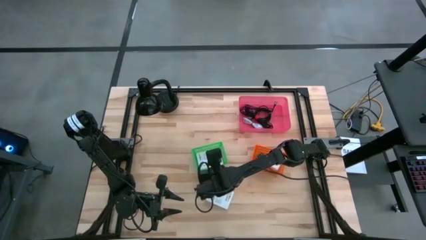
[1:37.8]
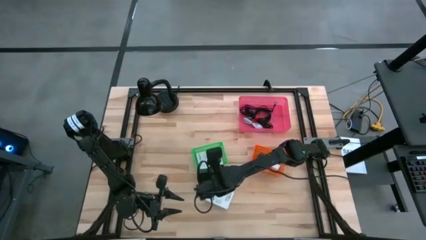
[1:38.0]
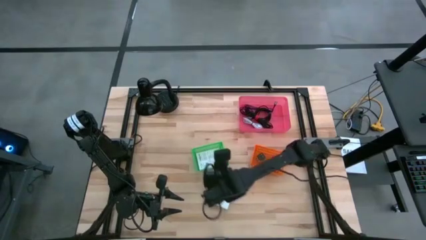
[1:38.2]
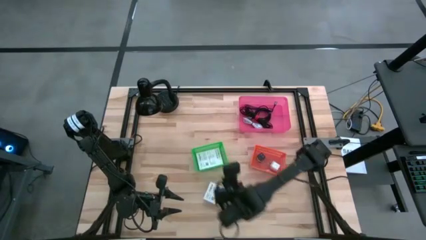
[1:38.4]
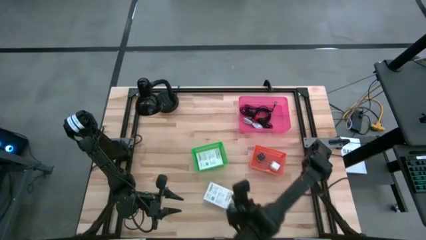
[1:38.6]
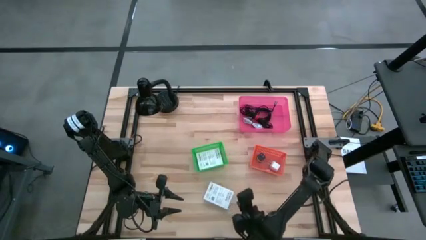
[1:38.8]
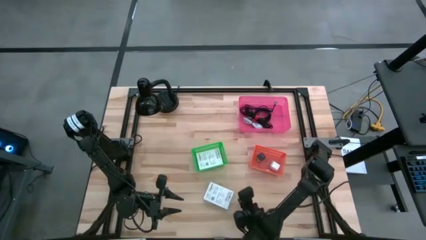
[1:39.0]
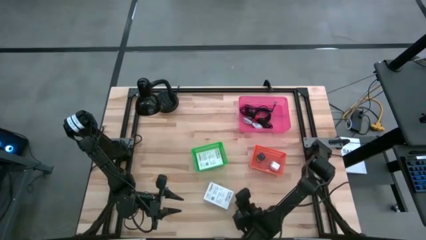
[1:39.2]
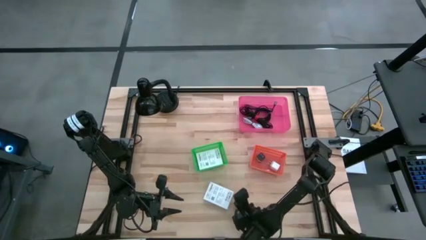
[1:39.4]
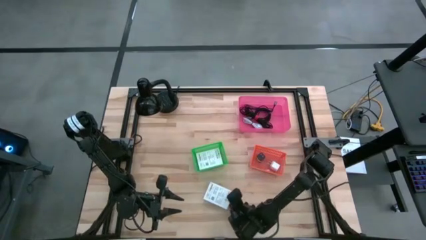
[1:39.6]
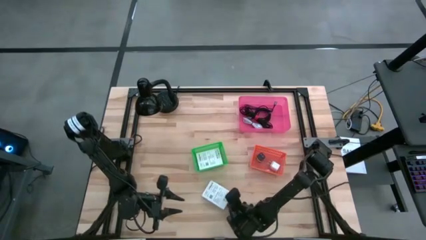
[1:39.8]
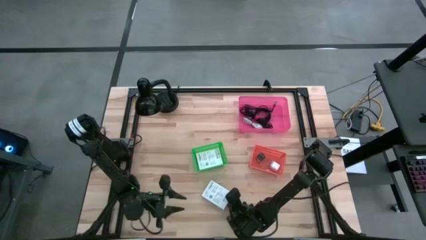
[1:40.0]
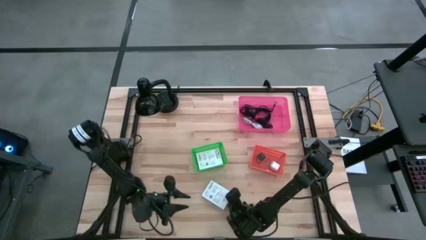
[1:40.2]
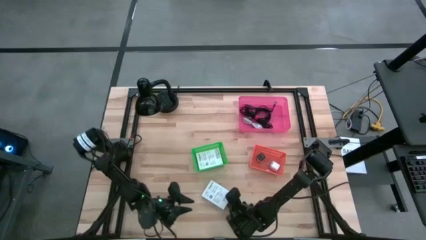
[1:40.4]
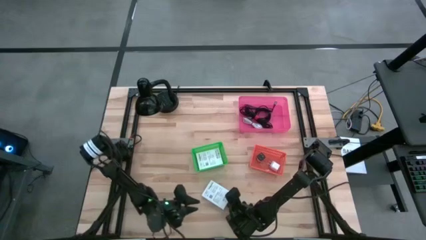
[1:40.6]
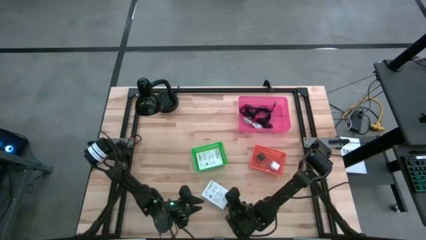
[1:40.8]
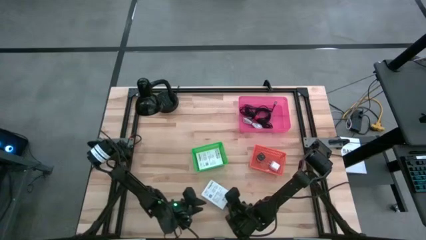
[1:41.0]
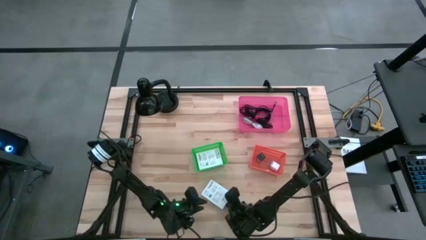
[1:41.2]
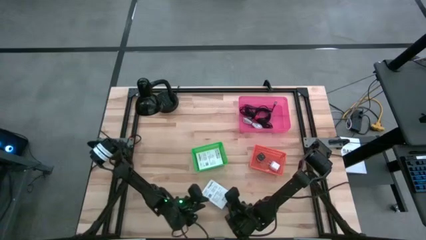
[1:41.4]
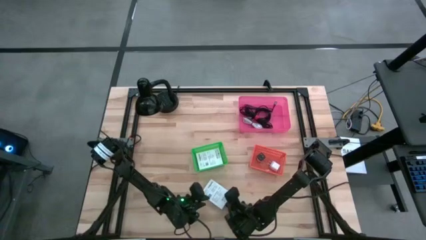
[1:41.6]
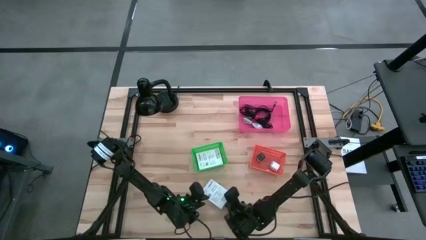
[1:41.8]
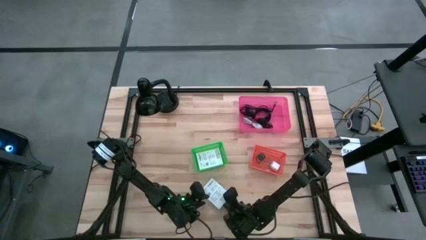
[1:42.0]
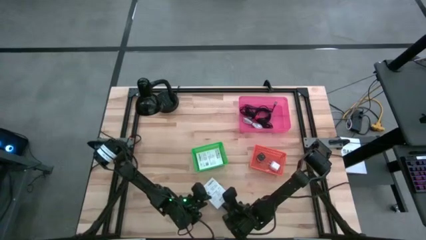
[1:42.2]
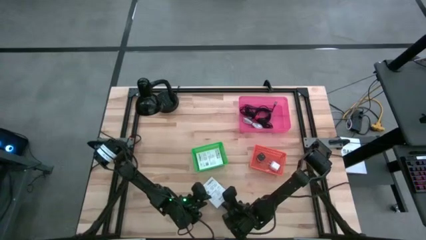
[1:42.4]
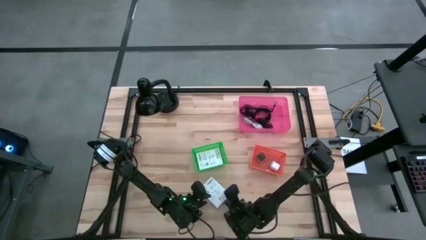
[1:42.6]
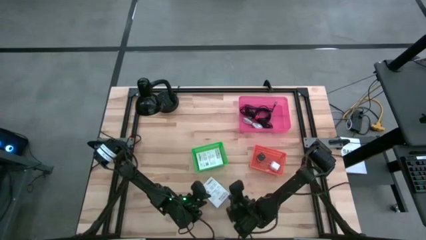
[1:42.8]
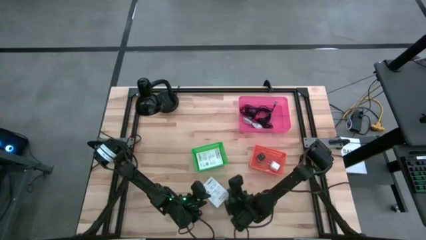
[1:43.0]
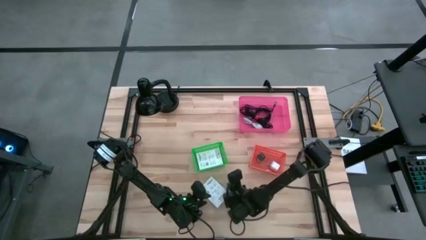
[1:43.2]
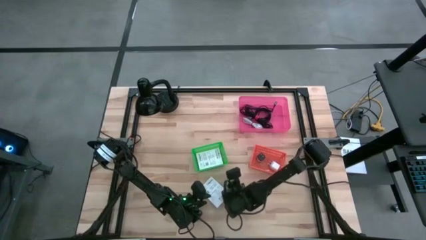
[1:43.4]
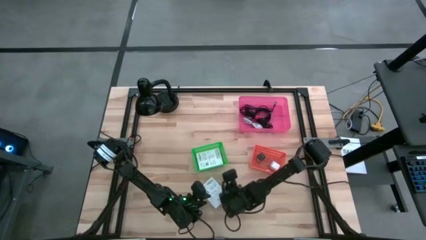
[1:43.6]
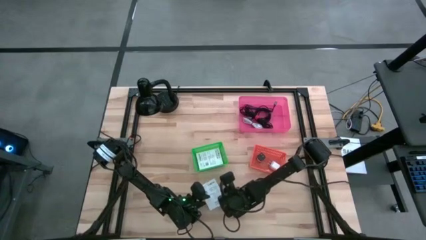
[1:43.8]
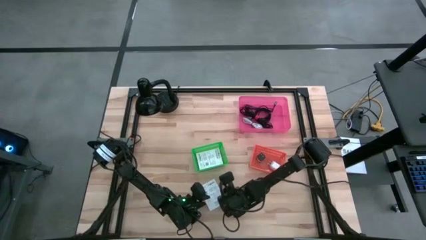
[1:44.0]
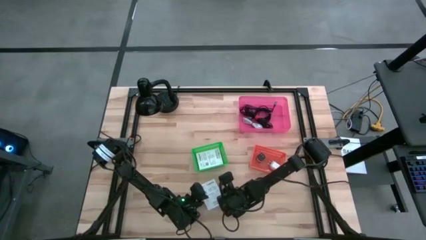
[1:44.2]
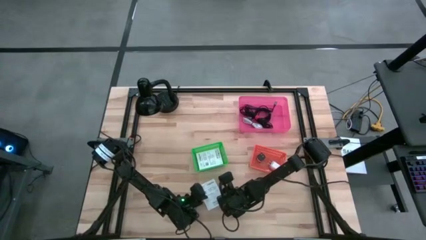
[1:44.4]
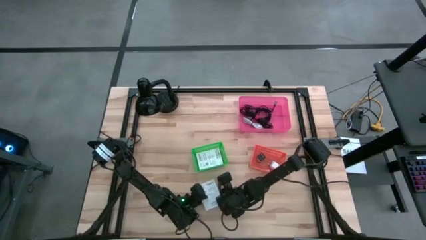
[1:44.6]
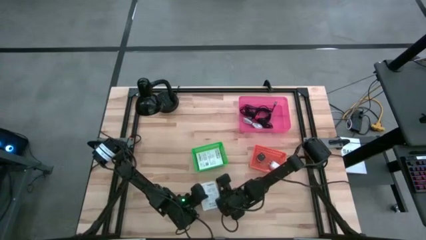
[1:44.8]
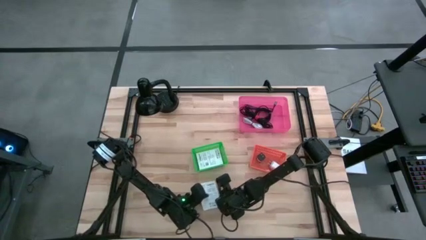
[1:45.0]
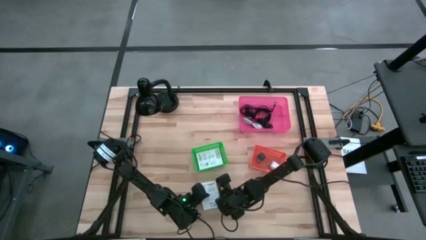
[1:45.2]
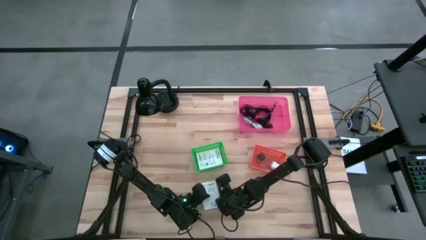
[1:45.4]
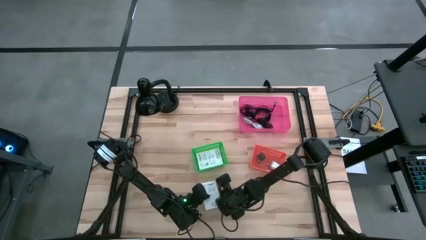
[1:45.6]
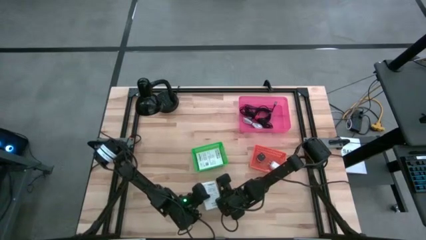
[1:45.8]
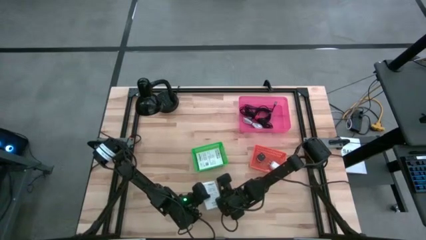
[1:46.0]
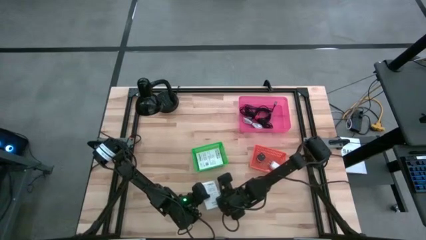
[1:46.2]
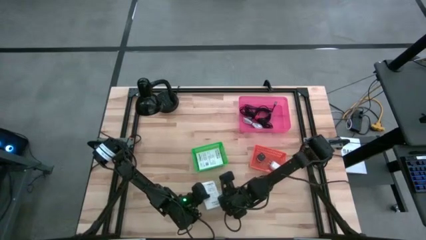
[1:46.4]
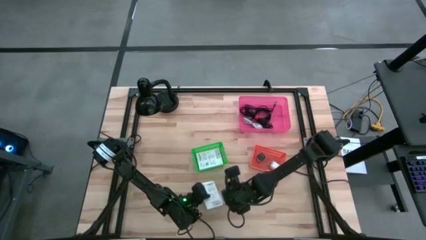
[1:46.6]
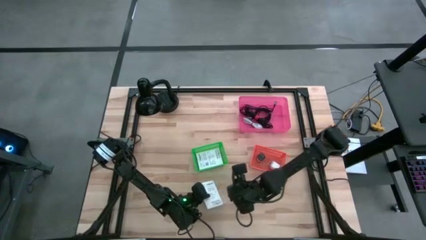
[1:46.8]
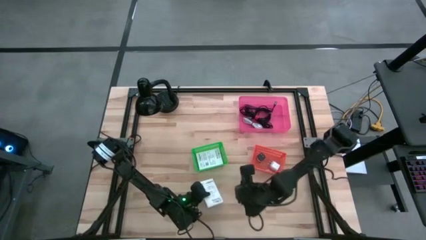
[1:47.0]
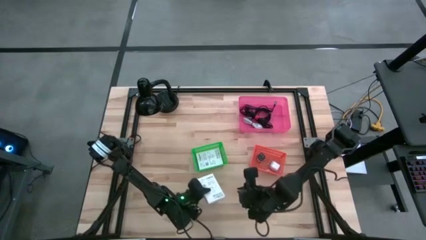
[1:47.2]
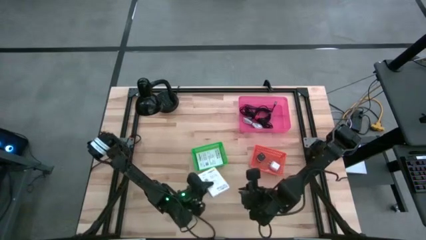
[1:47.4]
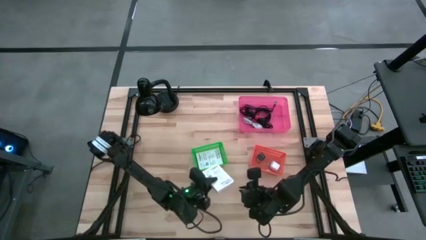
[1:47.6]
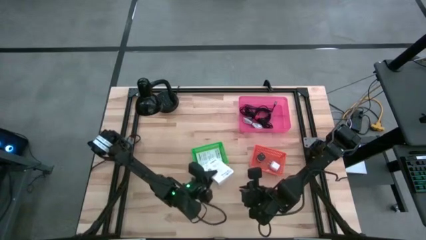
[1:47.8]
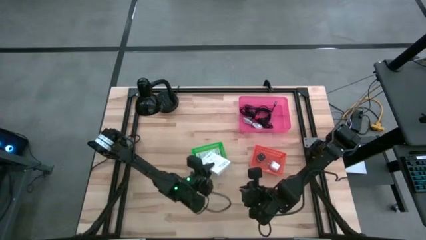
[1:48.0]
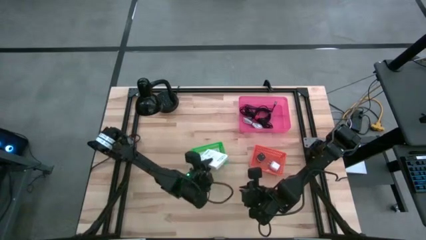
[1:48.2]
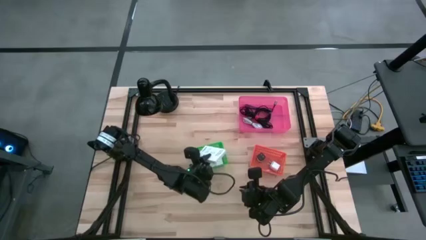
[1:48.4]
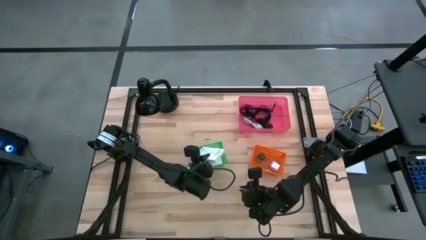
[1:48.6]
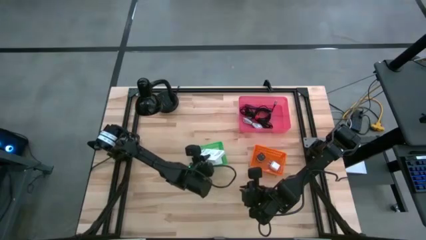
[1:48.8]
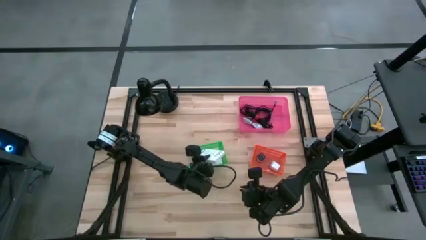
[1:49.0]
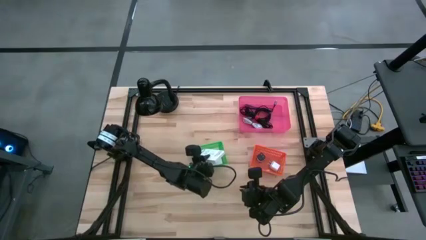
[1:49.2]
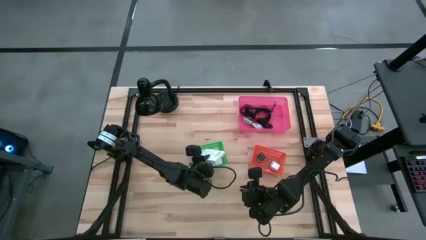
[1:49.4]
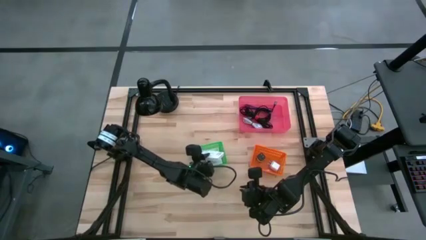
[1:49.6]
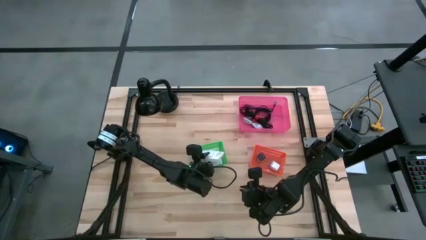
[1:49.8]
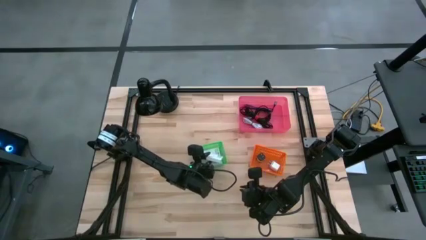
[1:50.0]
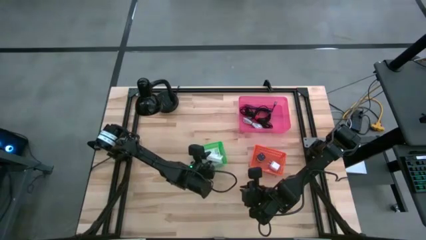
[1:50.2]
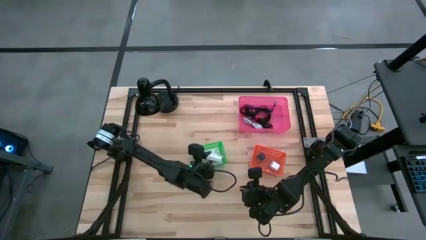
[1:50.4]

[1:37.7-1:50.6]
Task: Pick and place items into bin
Put the card reader box into the green bin

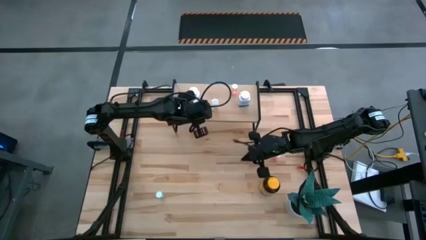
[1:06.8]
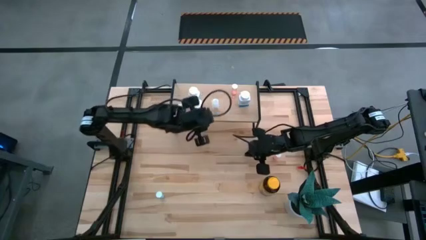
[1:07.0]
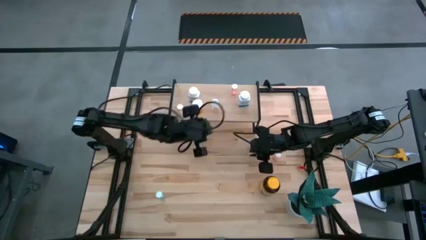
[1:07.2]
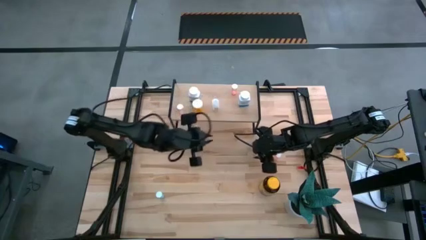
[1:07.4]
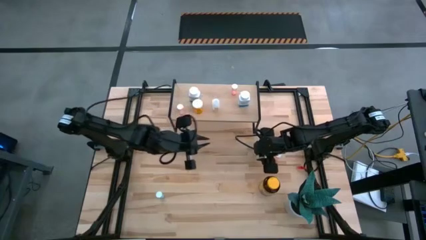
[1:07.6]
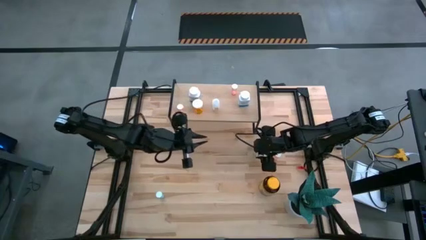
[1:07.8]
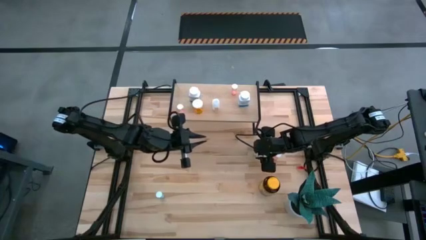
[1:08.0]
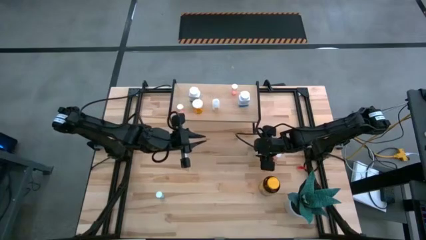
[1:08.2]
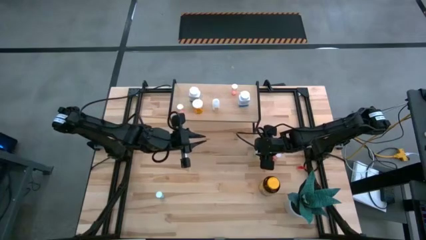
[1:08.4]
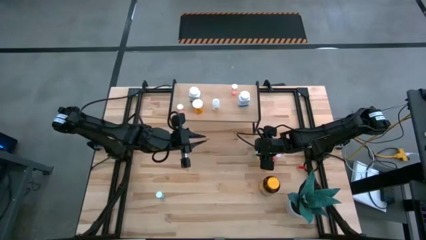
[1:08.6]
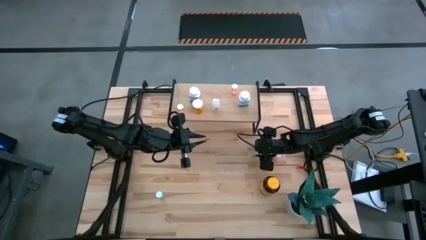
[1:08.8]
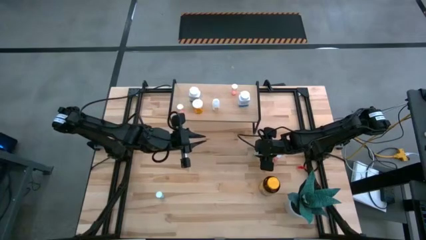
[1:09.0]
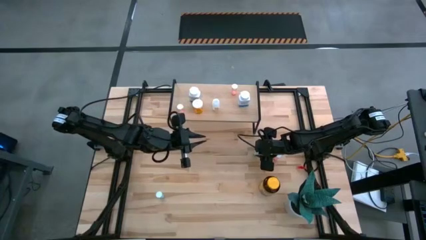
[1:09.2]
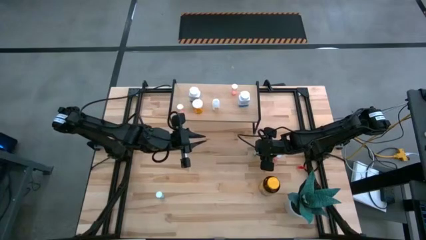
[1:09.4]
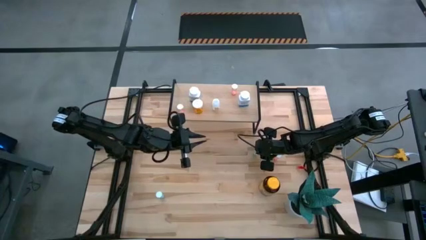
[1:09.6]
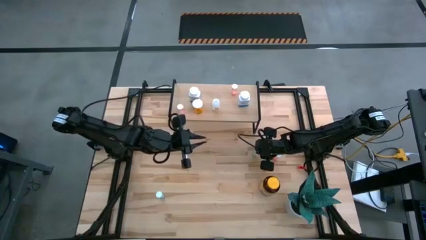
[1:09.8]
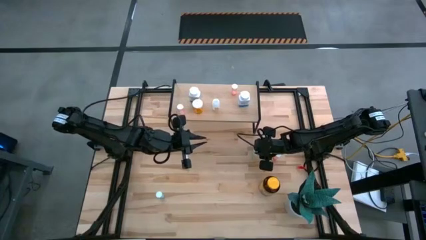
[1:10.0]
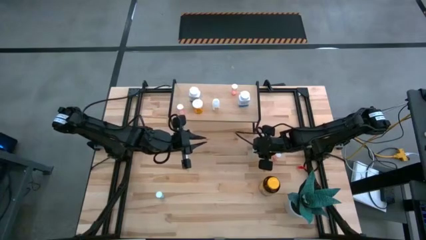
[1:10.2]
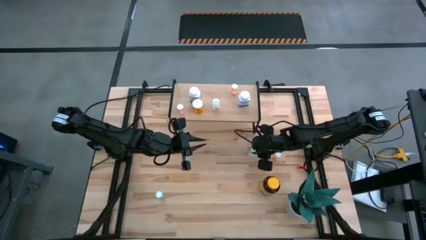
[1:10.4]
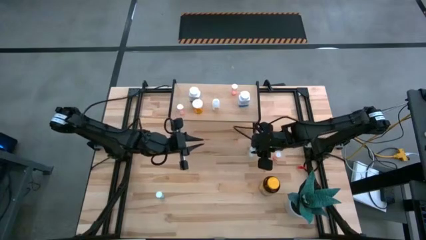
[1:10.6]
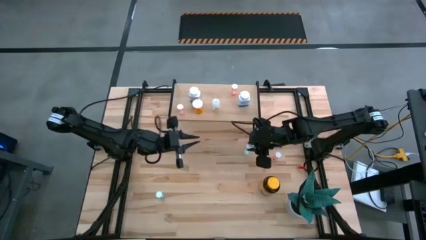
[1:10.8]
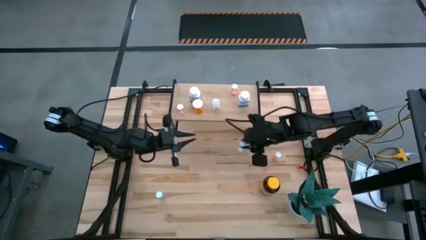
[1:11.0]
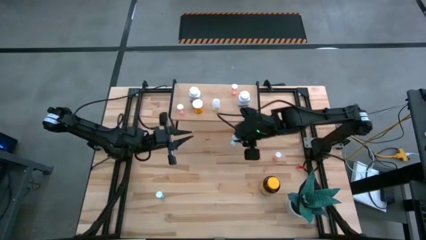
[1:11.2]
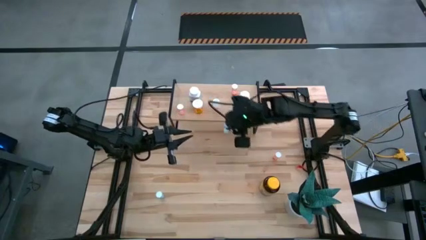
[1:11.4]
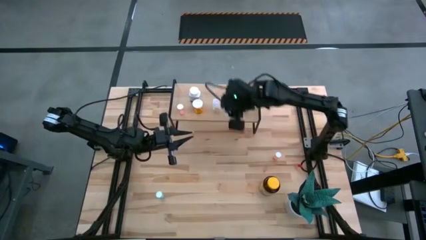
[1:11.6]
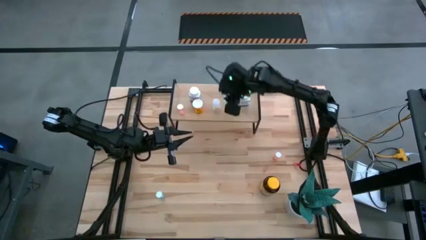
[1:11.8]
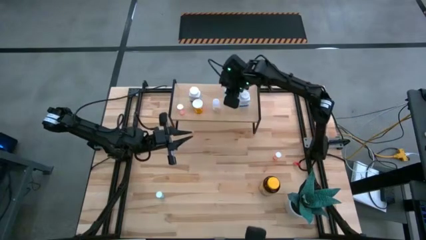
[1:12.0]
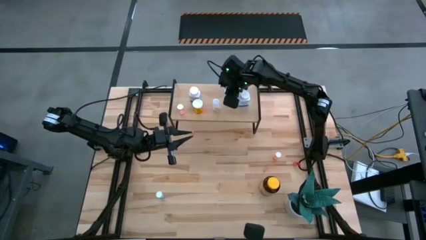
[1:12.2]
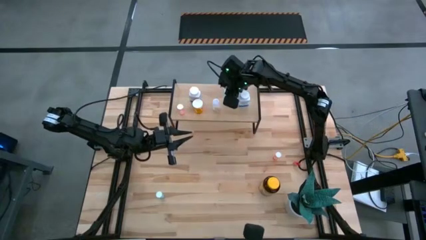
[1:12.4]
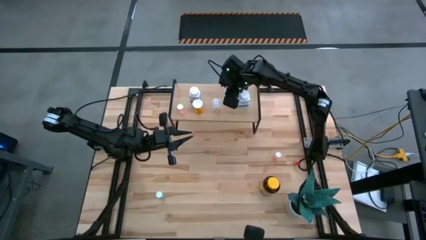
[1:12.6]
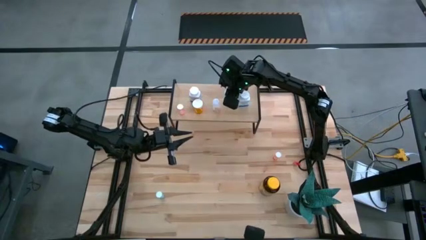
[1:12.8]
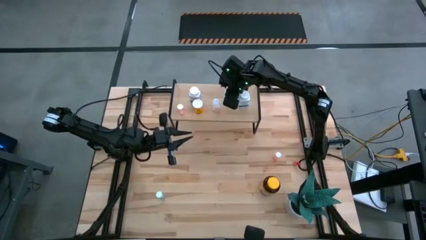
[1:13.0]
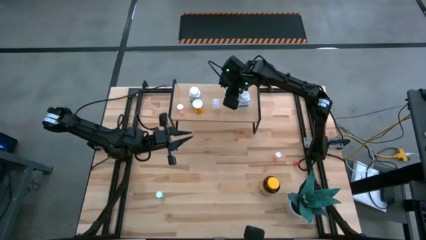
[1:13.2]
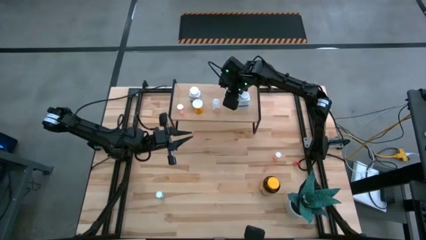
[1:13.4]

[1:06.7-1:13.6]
Task: Pick and place medicine bottles onto shelf by color
Put the right blue pill bottle on the shelf
